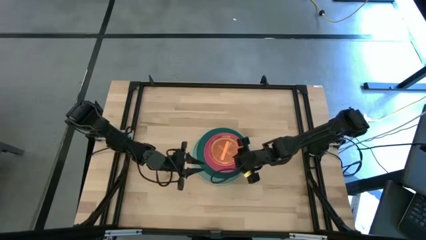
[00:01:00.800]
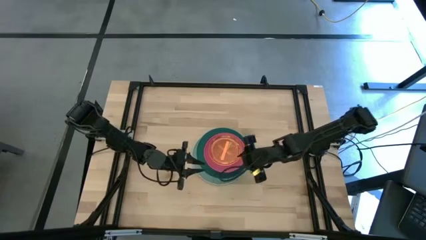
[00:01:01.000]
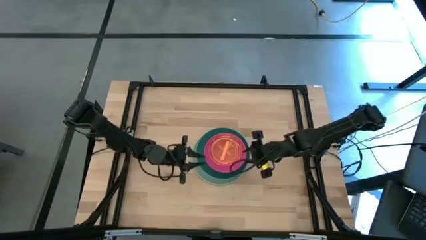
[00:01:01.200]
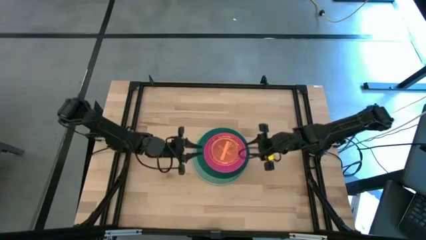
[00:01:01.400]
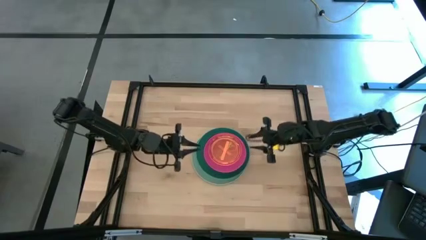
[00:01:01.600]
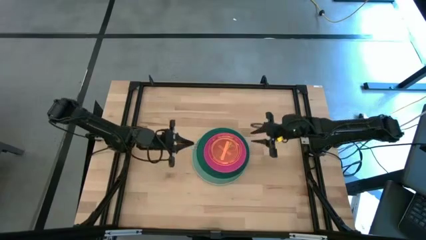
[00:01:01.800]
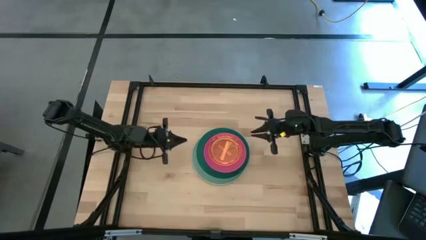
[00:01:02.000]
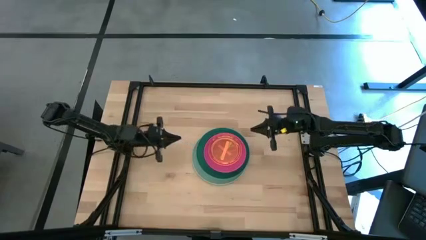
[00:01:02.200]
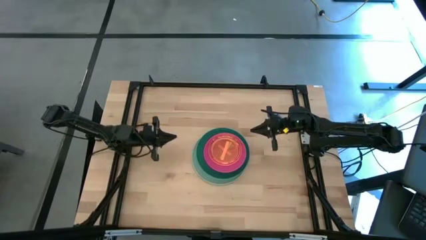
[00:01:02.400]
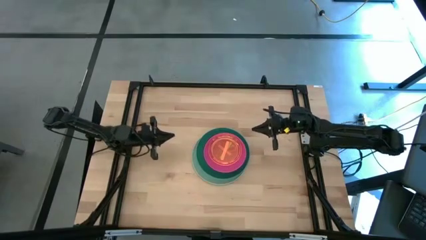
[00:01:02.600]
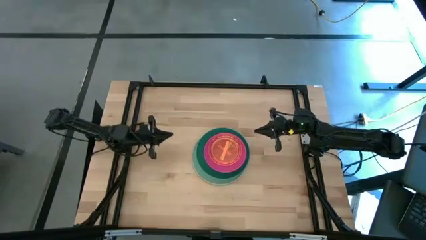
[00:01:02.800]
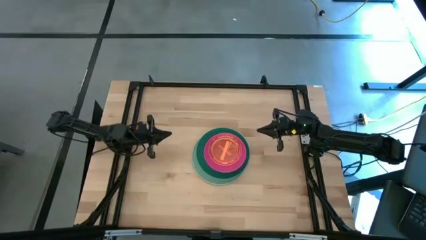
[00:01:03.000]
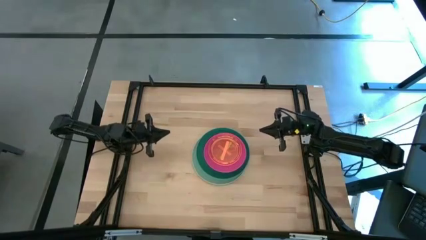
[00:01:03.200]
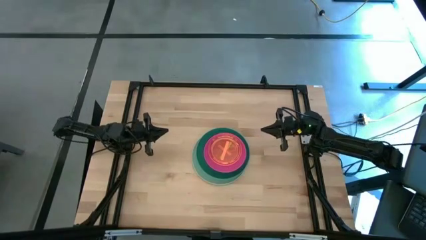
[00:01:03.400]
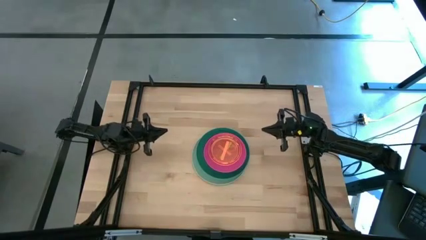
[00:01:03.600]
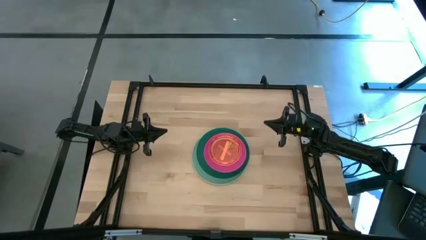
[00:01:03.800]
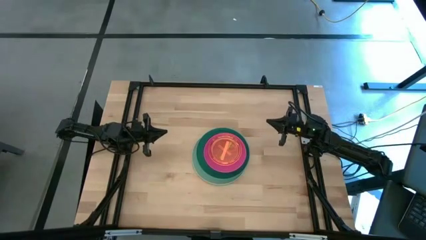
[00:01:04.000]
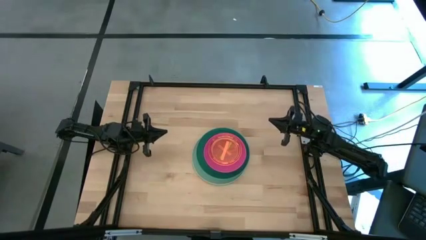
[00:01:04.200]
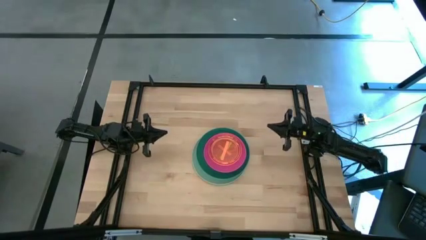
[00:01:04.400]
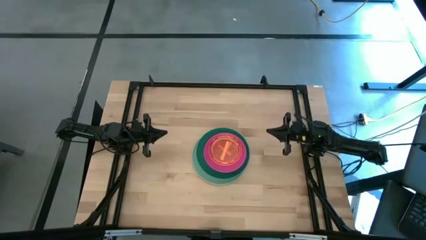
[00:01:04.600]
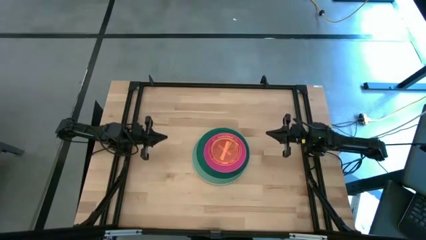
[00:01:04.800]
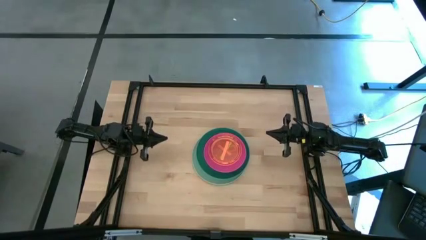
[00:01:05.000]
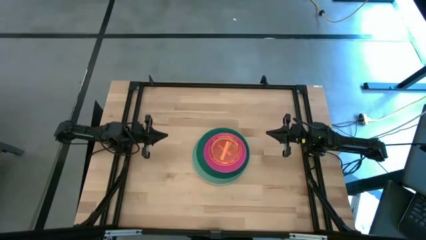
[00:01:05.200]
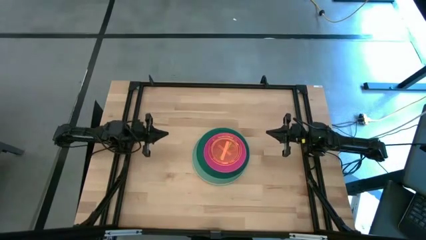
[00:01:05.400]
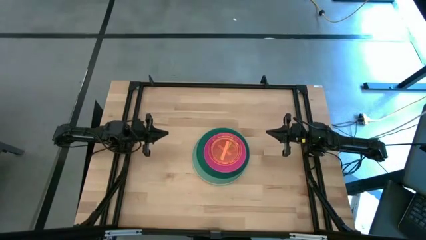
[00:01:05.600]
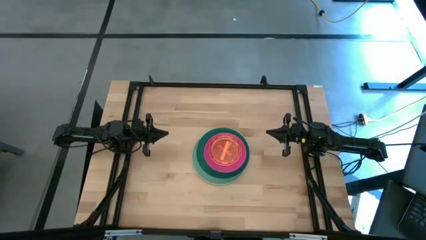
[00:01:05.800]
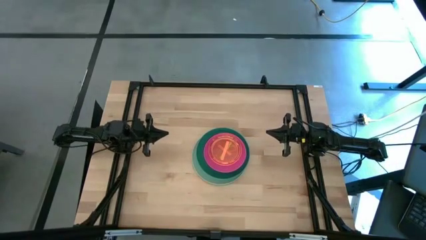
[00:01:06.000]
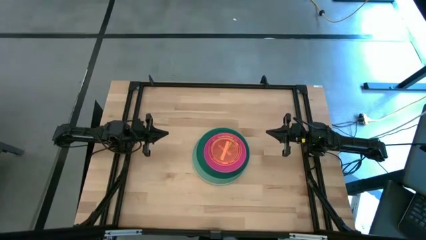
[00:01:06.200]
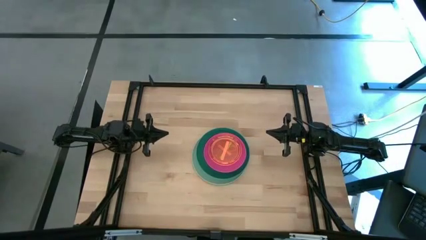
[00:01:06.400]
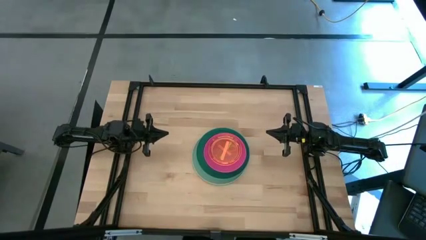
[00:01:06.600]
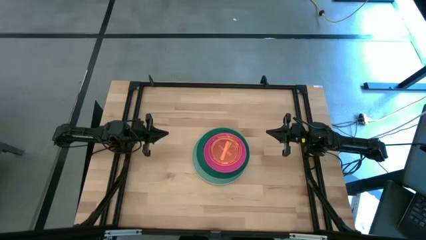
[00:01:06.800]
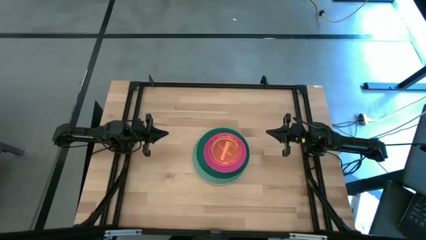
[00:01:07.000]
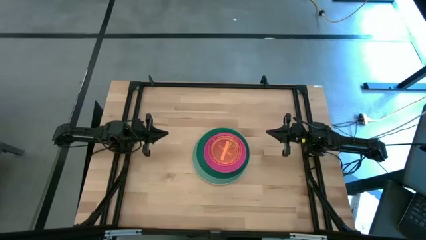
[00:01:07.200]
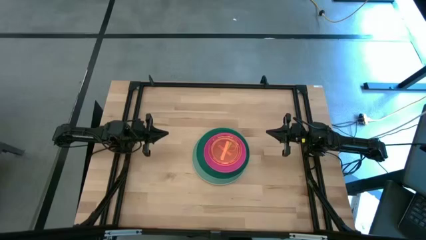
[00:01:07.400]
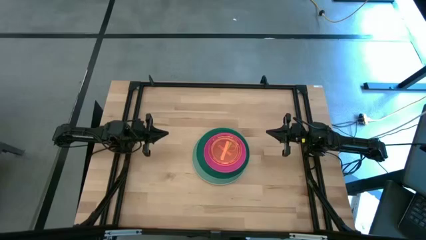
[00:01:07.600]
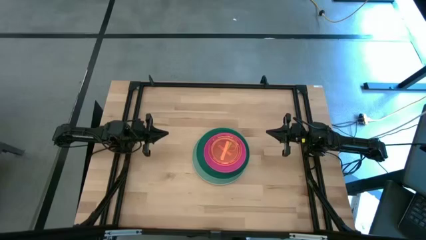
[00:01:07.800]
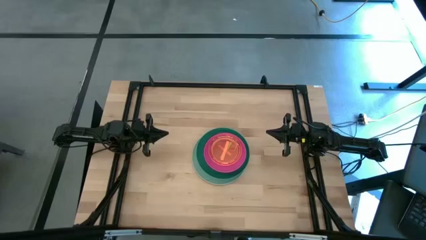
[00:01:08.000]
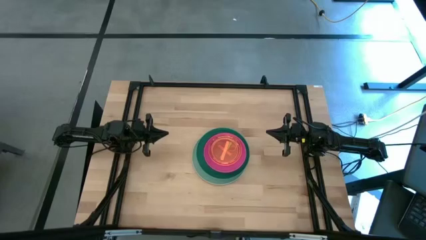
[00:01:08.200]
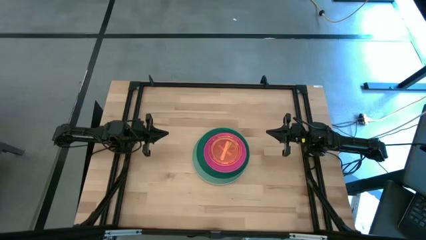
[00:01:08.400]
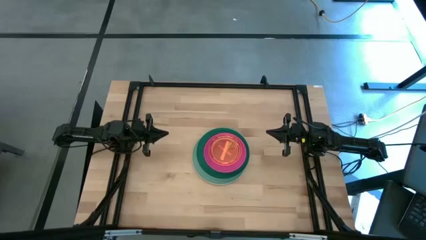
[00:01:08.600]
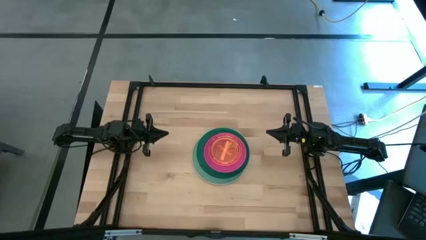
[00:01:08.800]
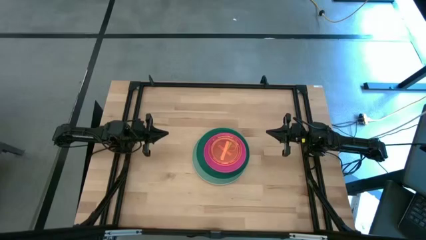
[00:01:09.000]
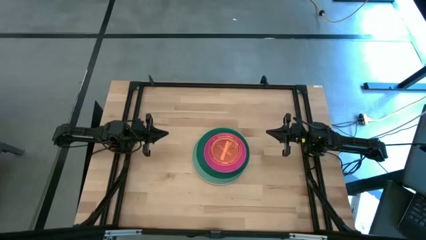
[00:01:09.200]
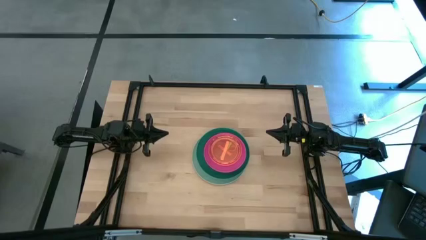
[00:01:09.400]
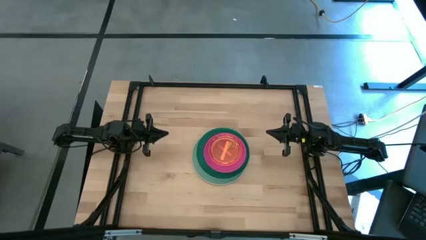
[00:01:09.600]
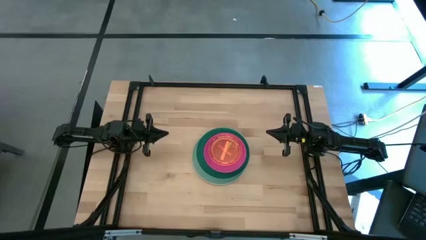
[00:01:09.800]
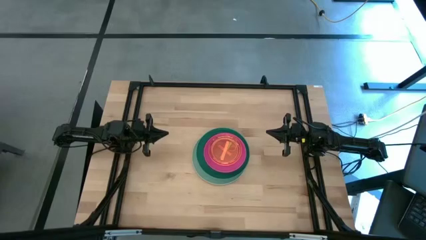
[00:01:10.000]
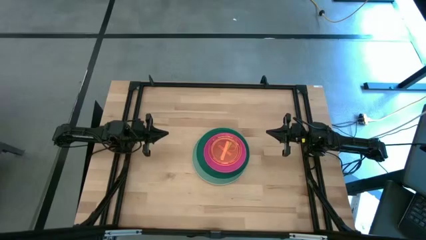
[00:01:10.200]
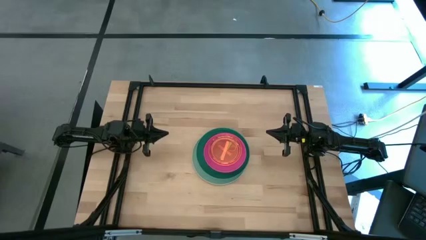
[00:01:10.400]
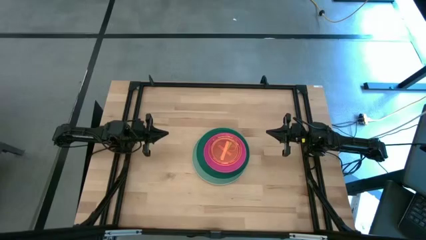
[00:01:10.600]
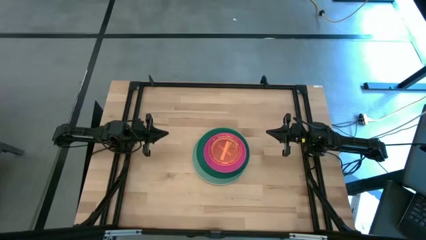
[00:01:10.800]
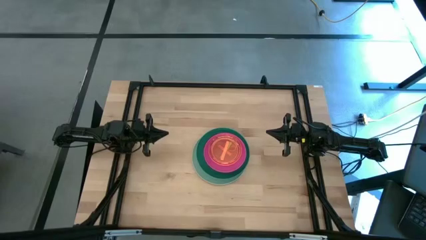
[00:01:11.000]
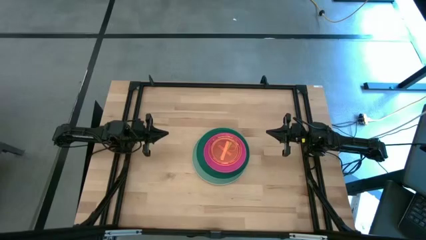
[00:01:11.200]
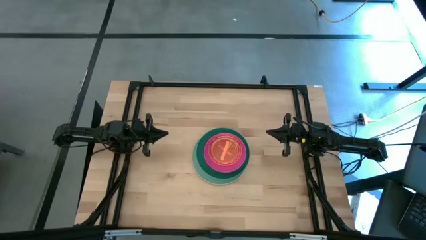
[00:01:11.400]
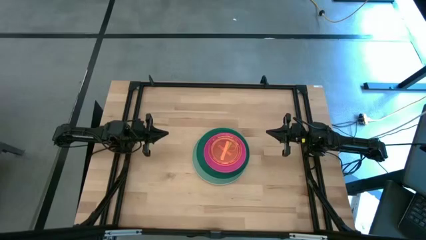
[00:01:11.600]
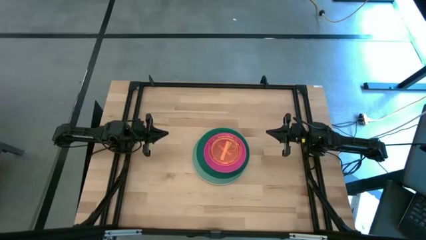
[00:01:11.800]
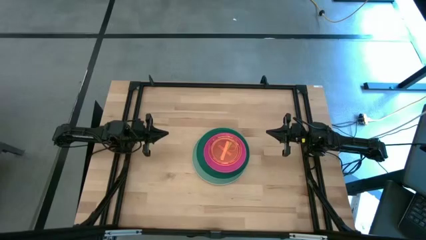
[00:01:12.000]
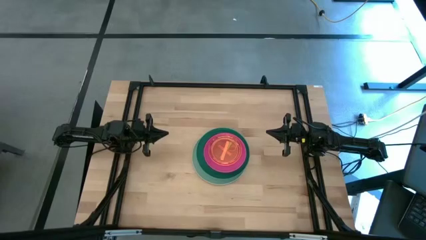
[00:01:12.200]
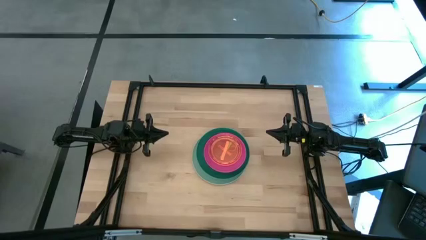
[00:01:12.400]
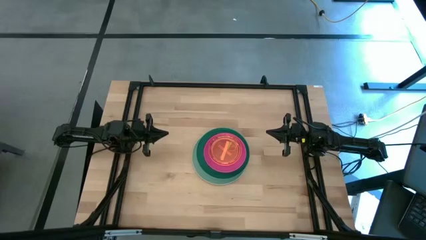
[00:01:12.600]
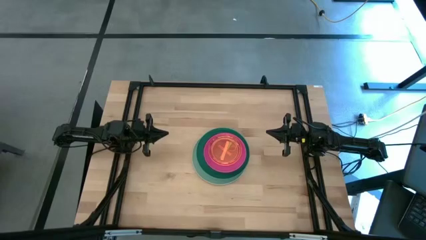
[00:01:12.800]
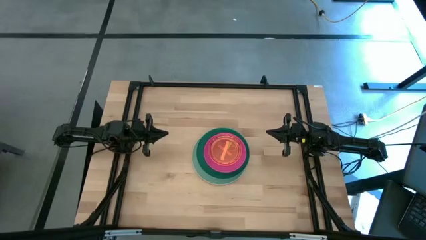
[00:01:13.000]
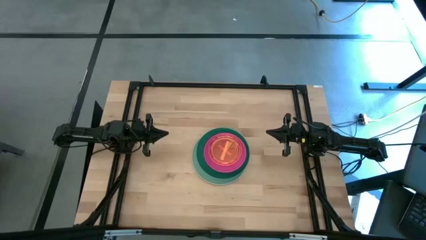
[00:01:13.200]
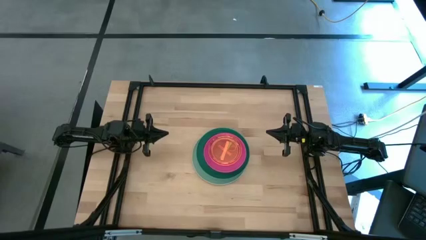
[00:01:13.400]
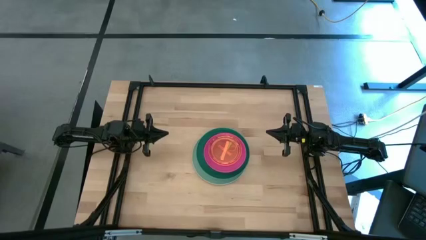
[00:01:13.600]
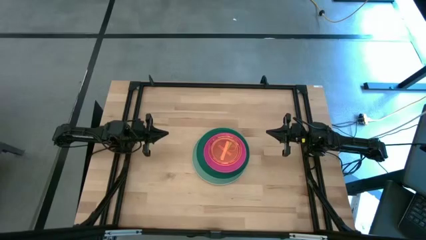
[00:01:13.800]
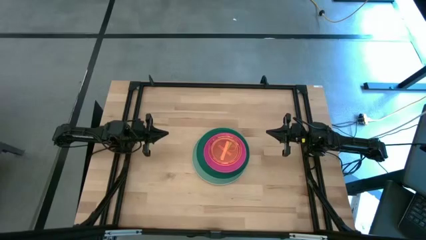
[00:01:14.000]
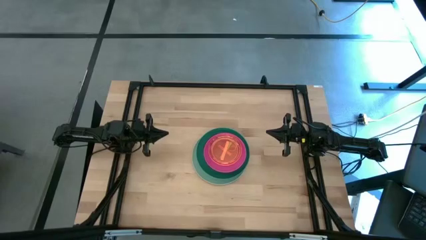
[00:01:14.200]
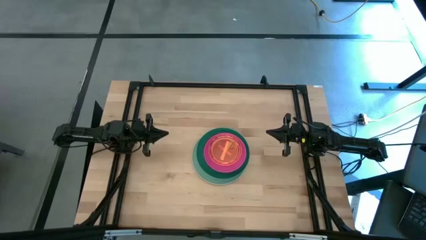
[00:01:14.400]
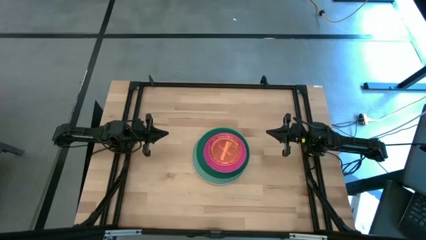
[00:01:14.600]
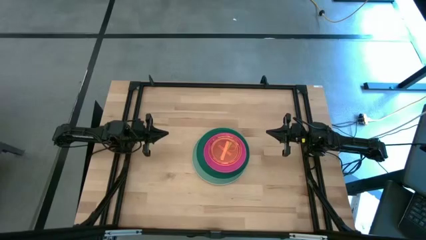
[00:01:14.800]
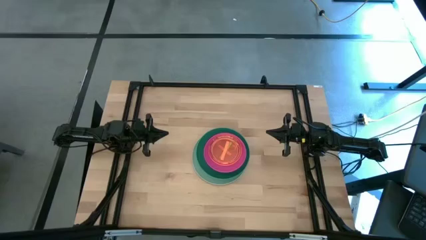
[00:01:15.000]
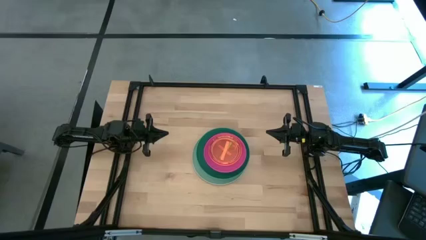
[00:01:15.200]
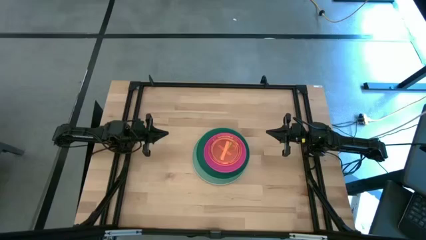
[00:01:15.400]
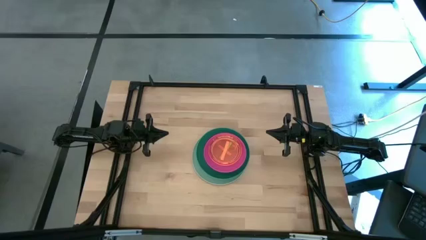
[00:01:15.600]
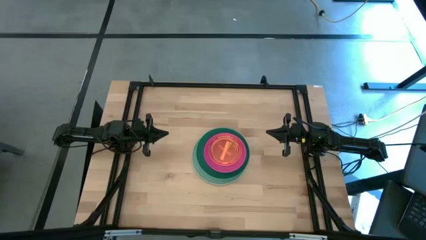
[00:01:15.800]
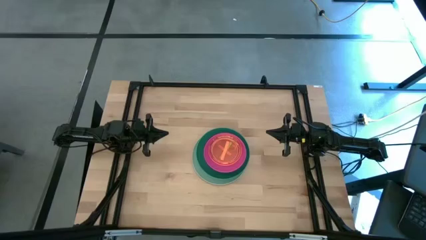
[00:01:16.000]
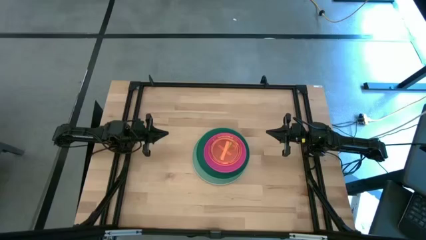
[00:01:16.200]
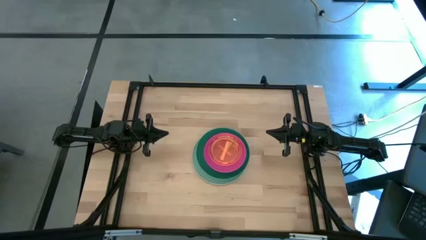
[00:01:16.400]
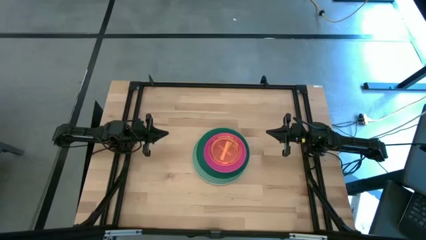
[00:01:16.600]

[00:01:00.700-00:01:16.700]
Task: Stack plastic plates
Return to Home Position

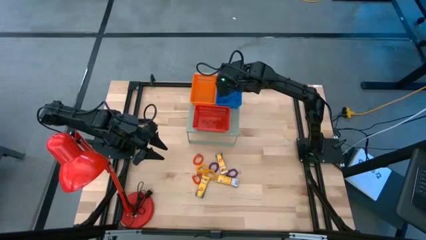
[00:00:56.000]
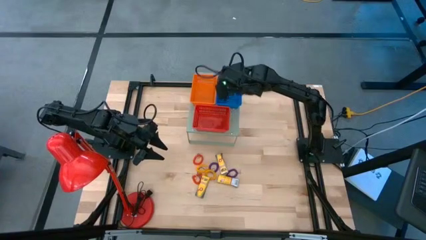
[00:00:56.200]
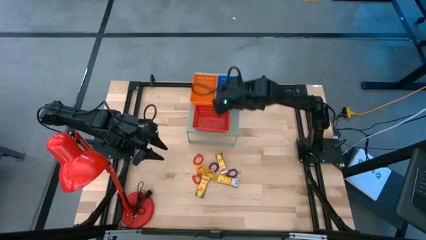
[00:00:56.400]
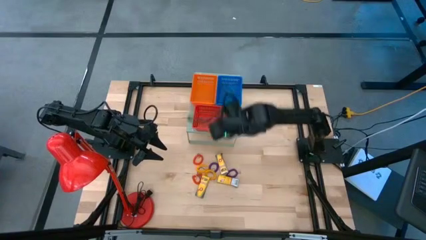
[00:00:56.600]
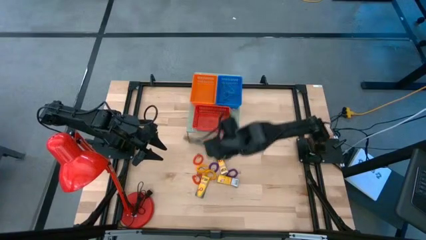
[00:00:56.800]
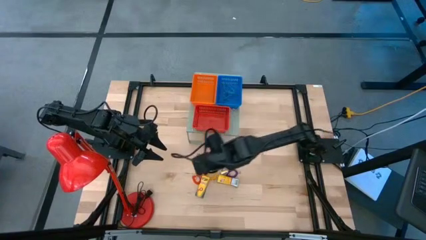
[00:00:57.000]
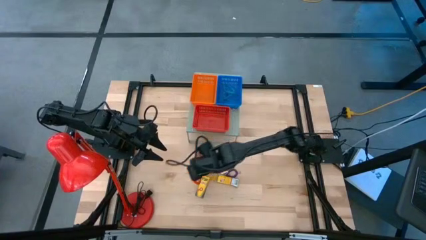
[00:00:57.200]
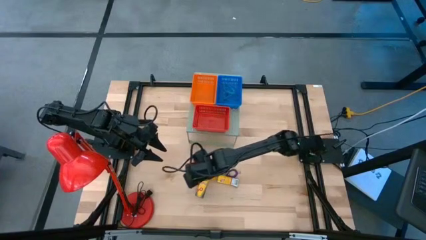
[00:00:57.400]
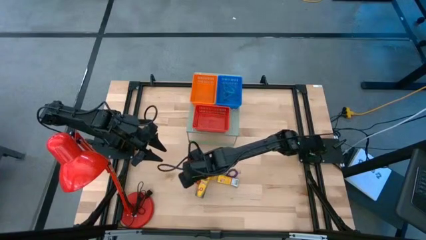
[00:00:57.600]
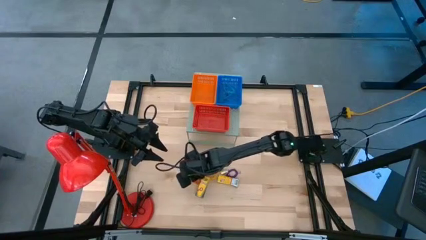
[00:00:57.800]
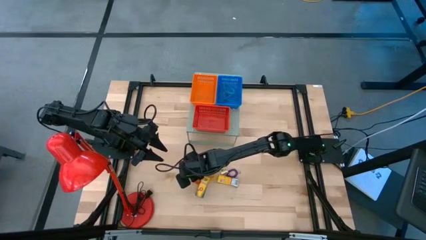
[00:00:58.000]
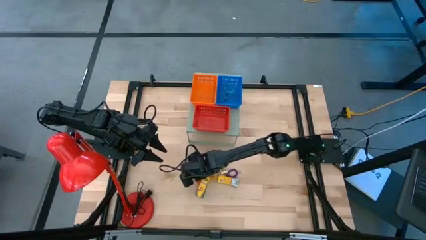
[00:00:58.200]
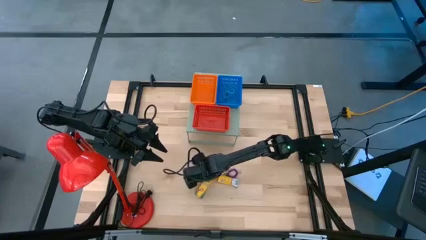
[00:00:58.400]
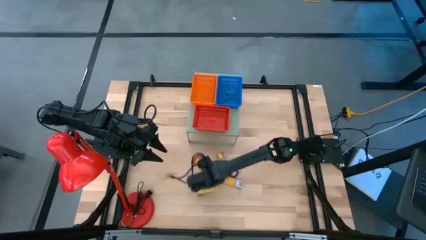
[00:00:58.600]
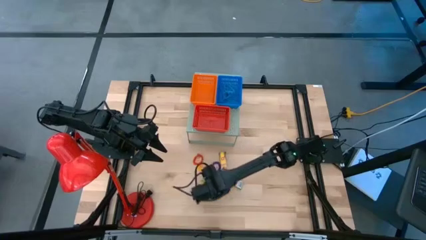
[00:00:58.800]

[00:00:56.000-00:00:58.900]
Task: Pick & Place Office Desk Supplies
Adjust the orange spring keychain on the table
